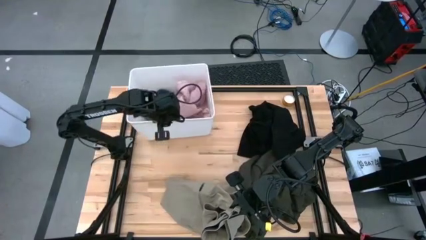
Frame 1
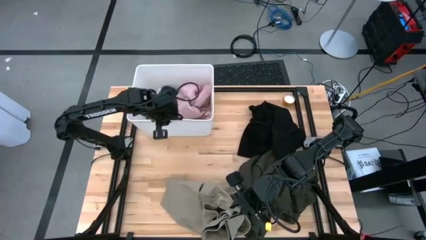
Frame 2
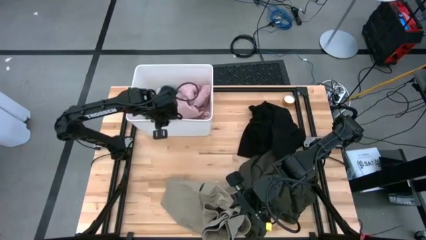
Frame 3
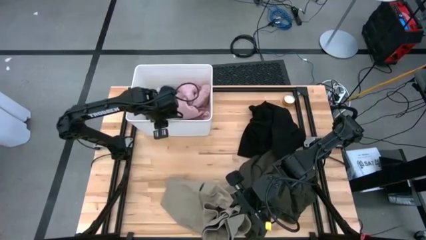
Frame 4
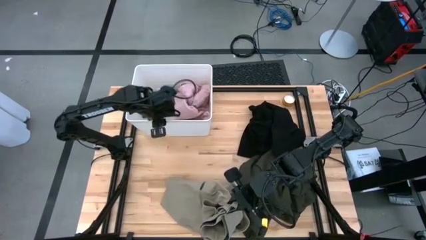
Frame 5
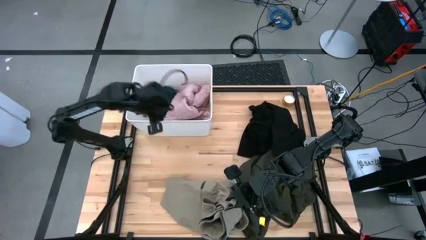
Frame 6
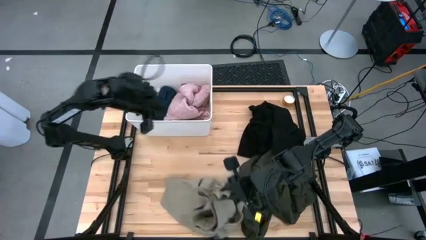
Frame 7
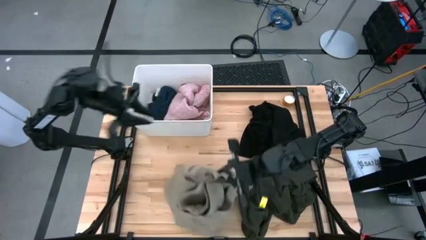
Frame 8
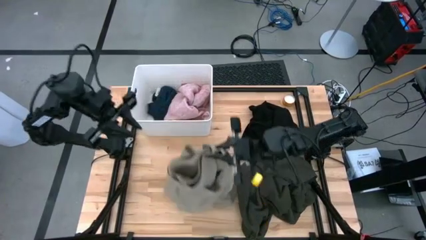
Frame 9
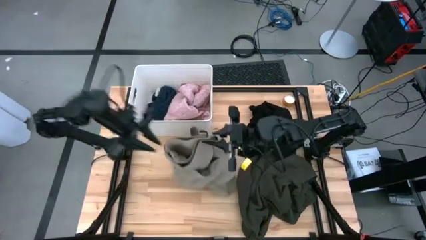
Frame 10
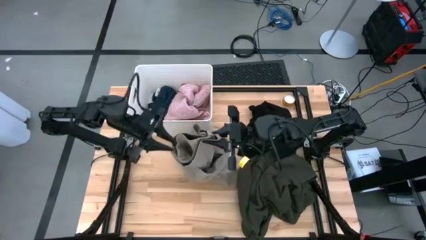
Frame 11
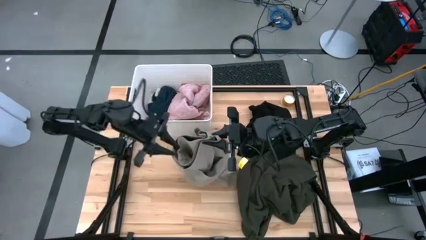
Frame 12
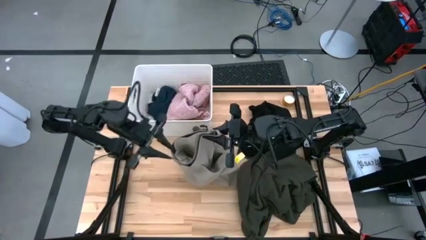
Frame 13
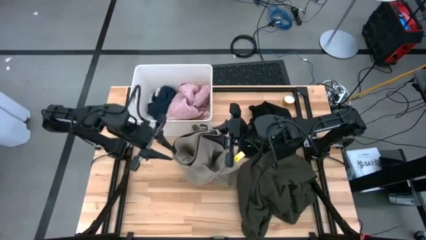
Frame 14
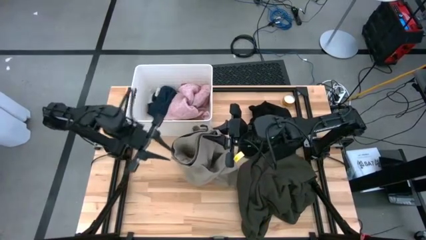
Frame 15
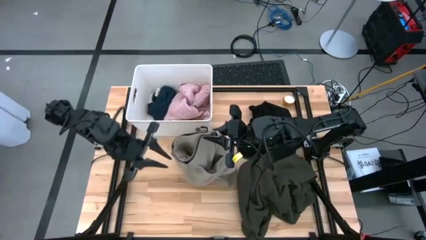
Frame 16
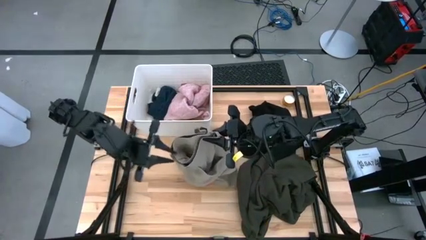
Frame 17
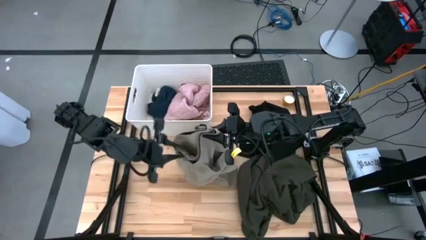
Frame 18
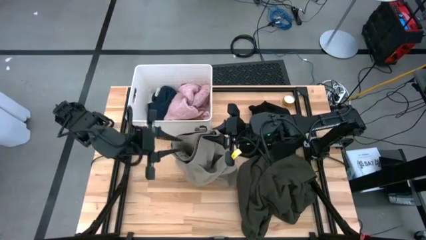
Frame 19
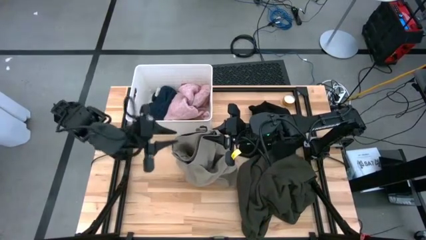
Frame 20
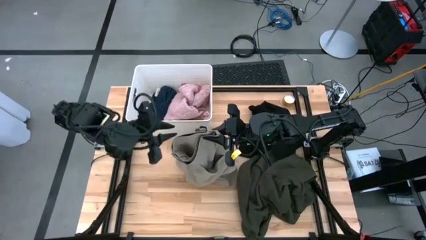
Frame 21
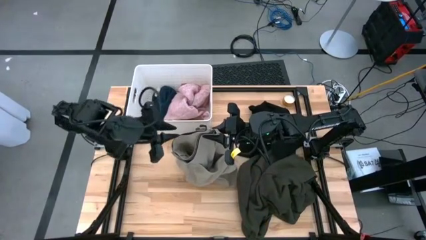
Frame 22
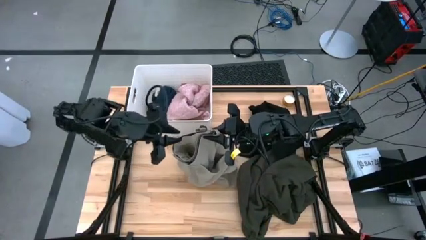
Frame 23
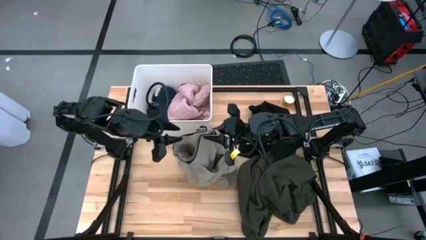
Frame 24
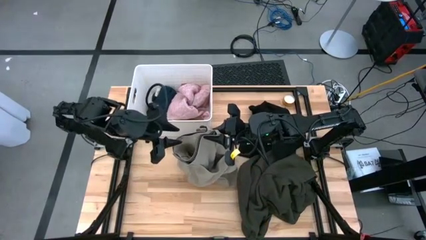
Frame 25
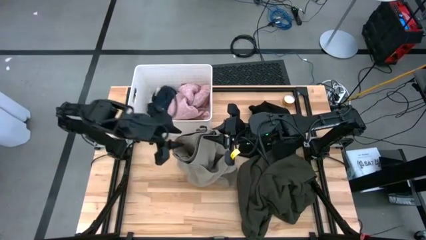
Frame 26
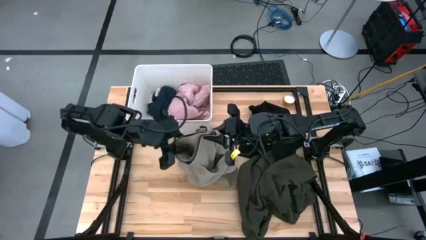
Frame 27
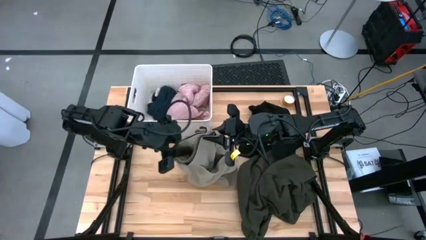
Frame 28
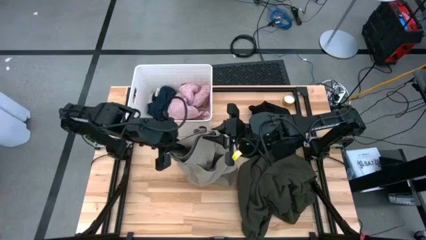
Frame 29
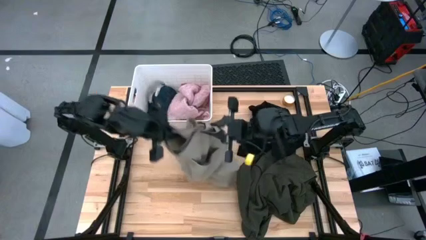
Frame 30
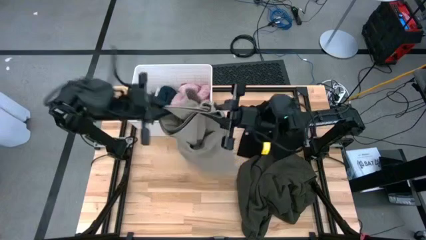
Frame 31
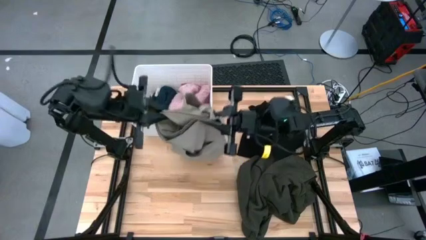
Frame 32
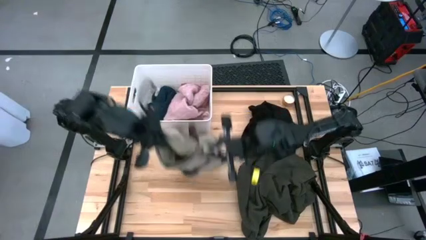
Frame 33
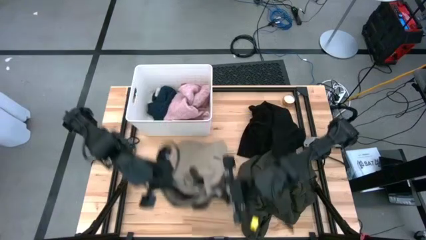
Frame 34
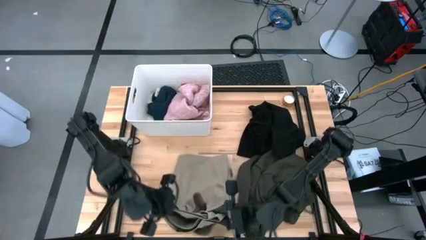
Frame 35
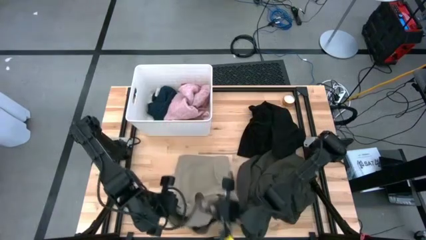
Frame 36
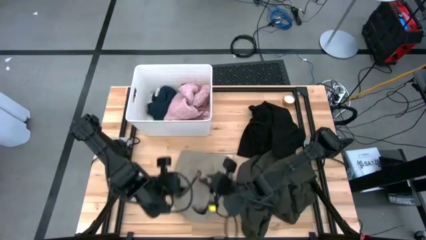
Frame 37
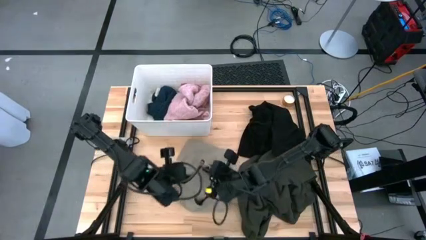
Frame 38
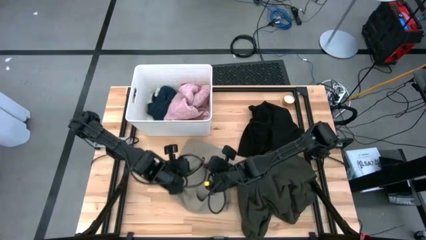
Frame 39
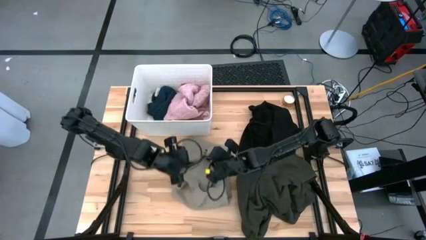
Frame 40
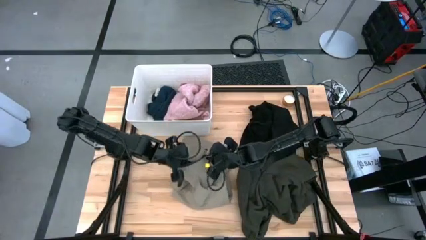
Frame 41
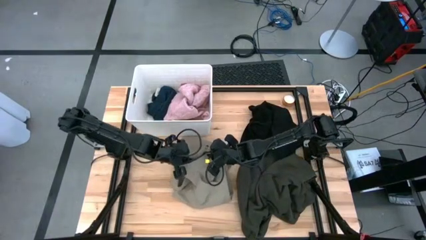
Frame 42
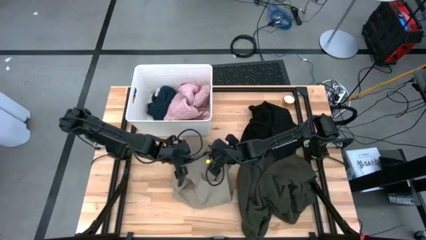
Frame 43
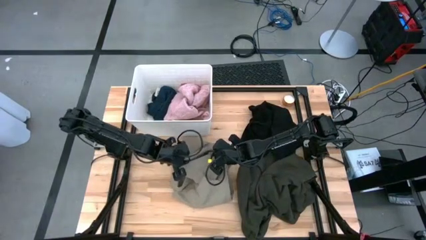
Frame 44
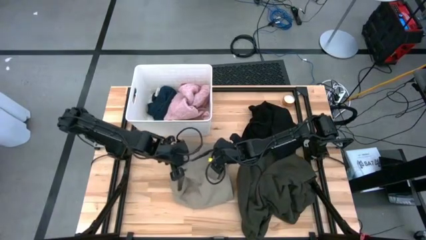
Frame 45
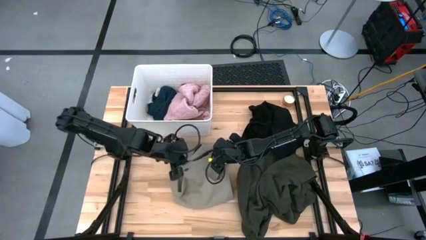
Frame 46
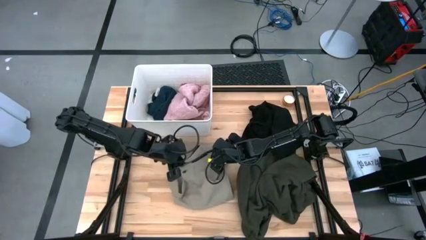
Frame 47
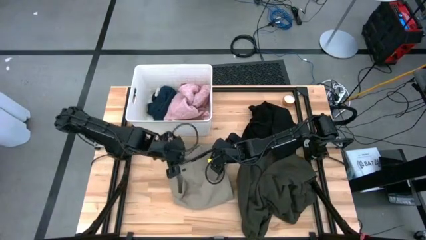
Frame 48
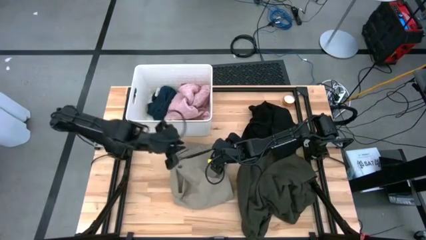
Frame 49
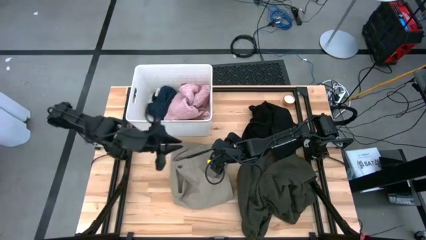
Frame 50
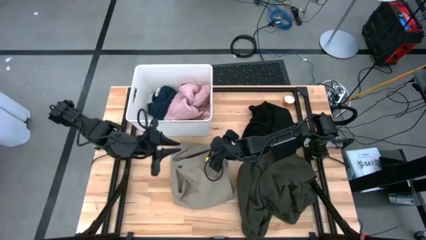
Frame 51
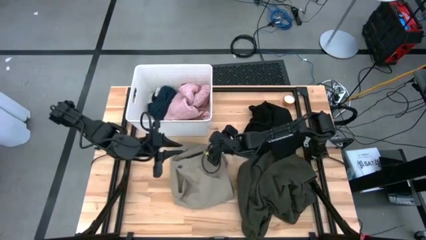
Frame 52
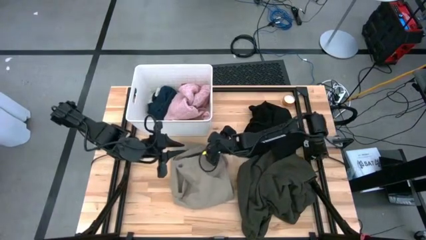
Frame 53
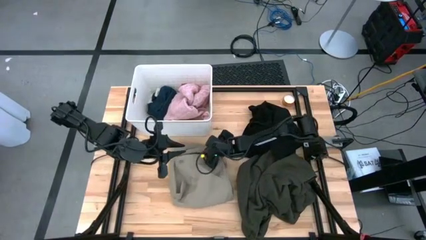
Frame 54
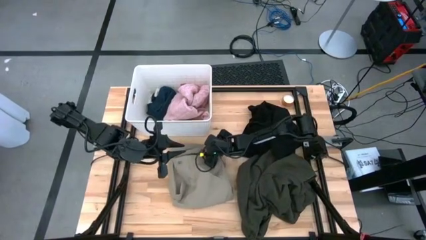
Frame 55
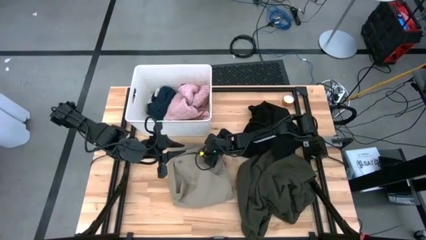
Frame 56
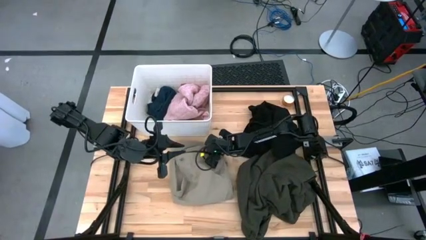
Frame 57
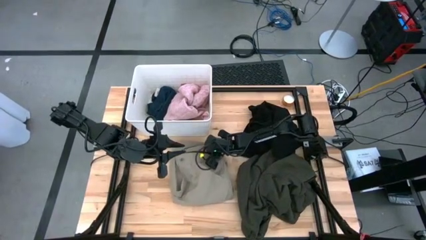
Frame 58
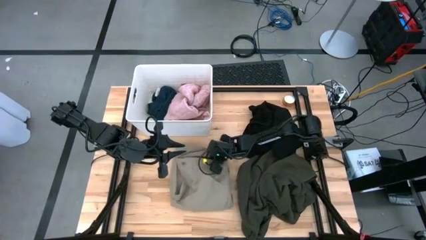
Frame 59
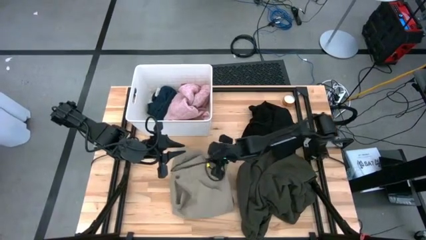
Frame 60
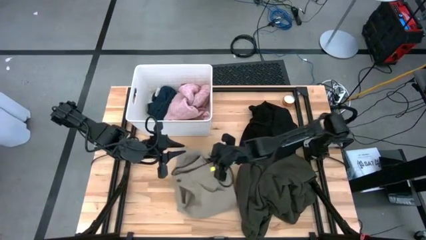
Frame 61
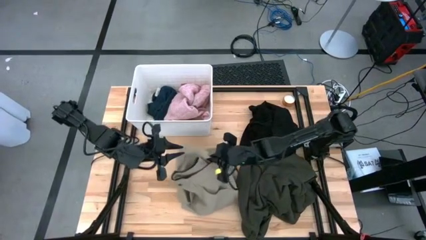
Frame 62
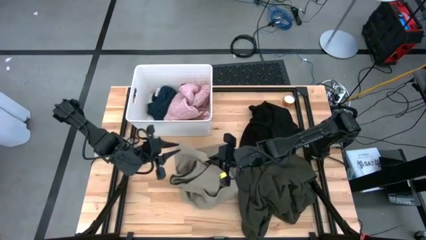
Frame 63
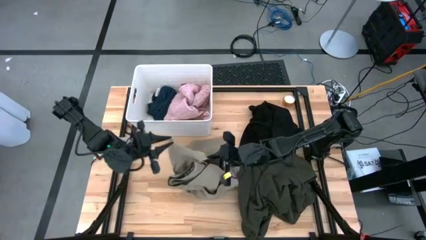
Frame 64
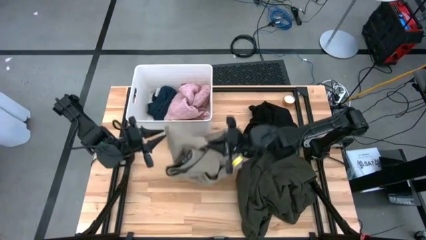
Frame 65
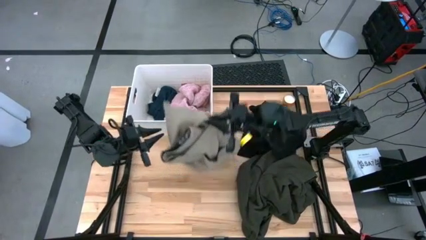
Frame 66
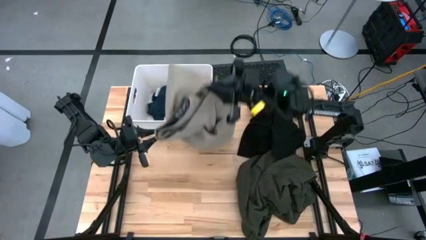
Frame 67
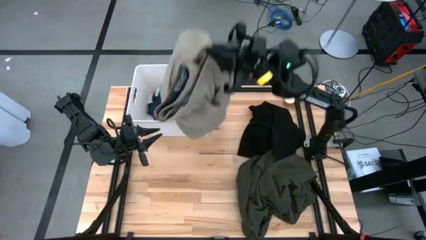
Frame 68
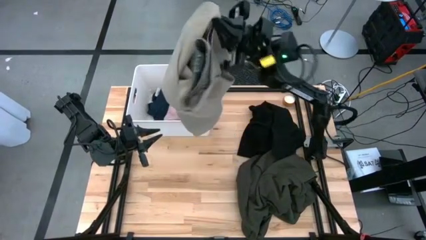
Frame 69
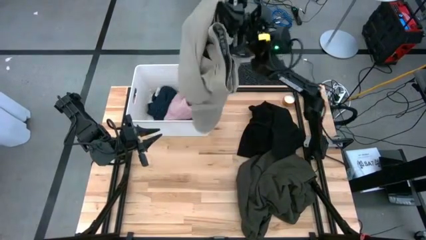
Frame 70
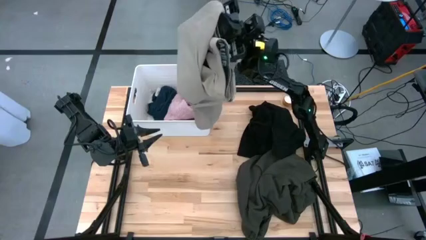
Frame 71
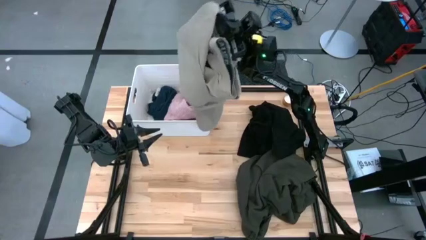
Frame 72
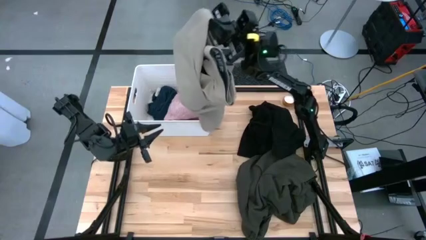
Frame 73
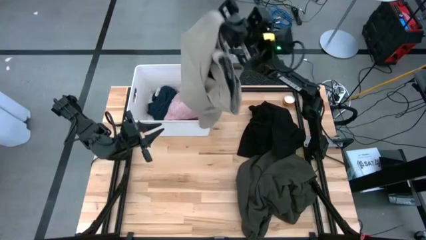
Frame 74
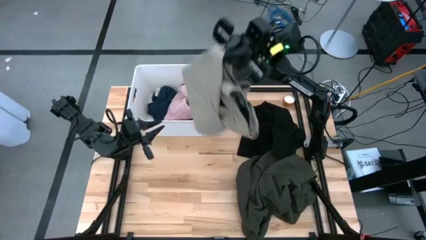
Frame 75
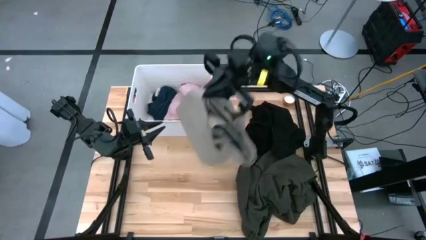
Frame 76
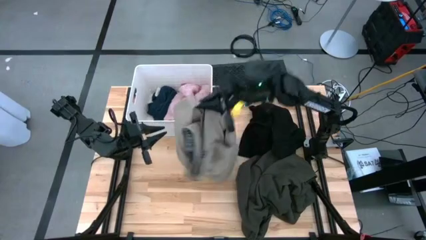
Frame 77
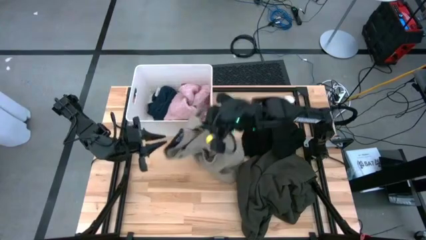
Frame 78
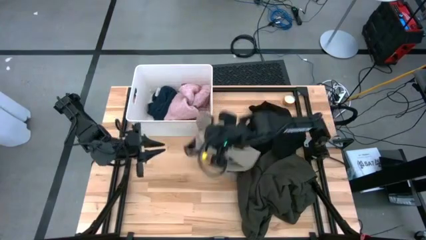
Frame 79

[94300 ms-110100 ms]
Task: Sort clothes
Put the brown shorts into the white laundry bin
